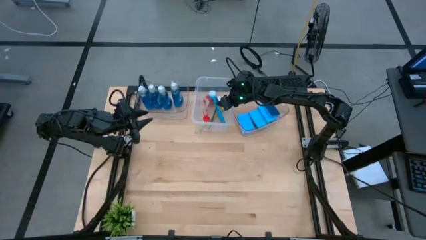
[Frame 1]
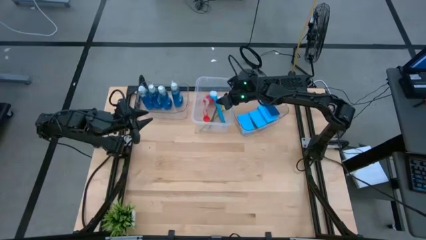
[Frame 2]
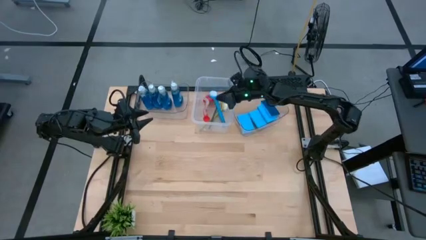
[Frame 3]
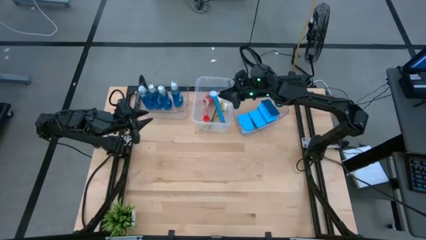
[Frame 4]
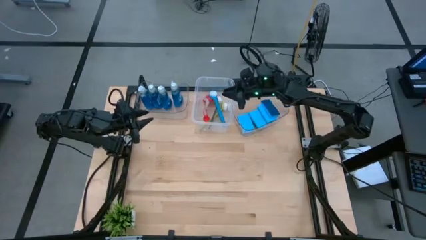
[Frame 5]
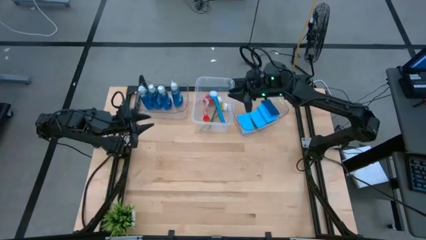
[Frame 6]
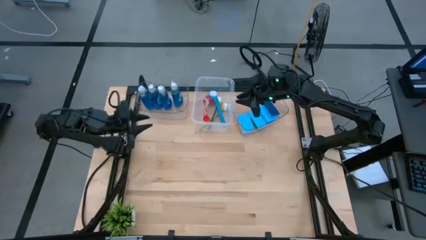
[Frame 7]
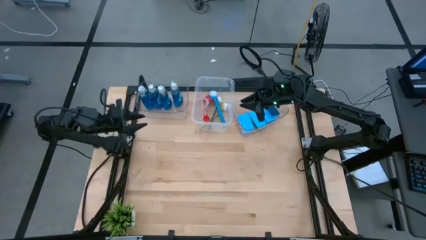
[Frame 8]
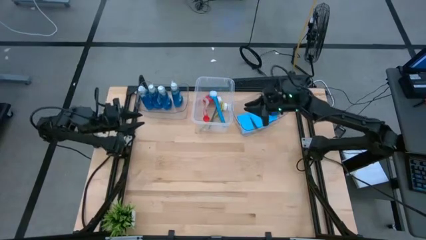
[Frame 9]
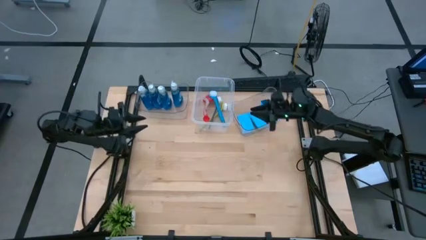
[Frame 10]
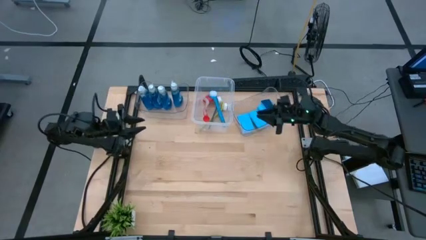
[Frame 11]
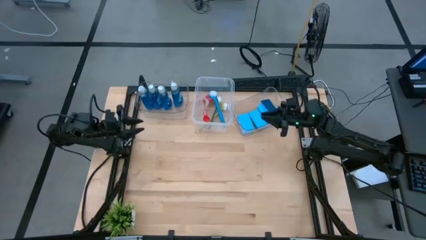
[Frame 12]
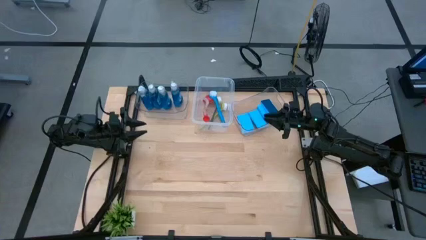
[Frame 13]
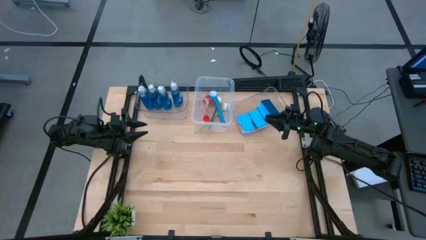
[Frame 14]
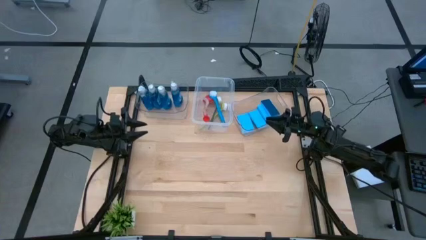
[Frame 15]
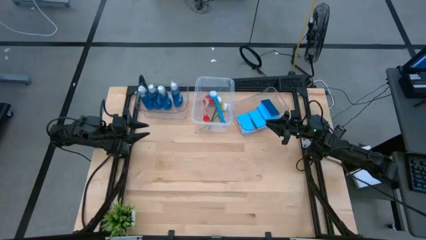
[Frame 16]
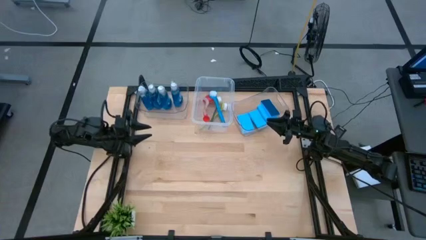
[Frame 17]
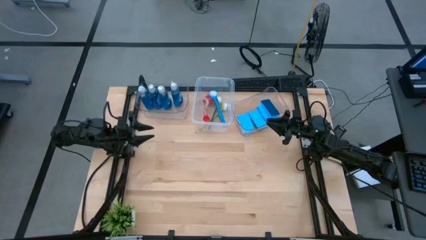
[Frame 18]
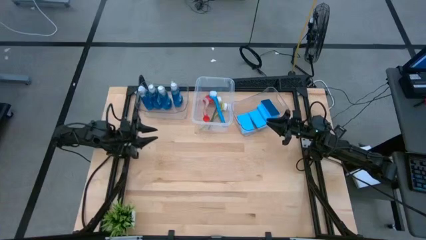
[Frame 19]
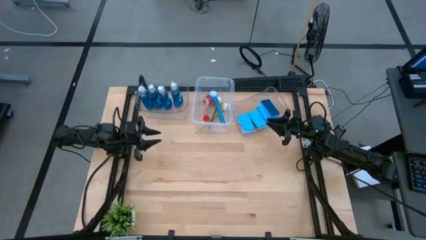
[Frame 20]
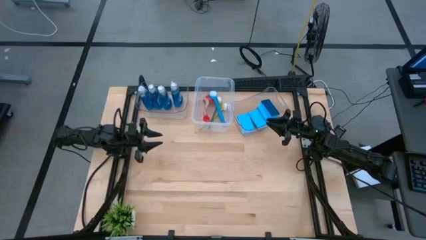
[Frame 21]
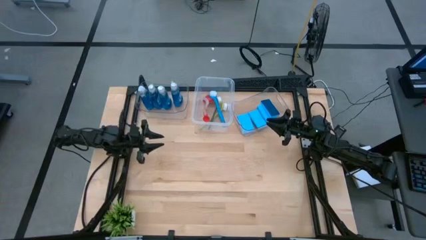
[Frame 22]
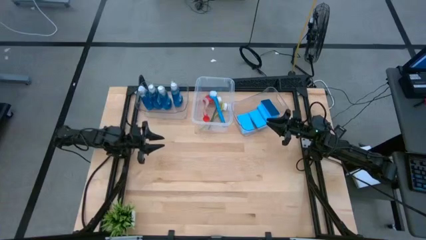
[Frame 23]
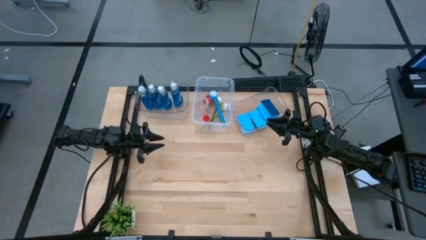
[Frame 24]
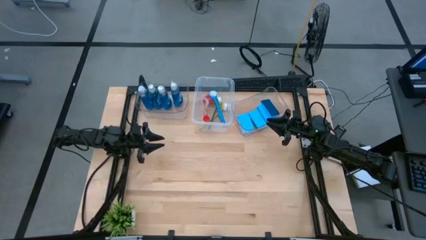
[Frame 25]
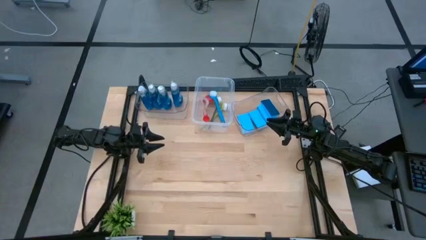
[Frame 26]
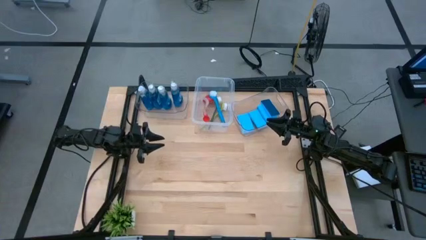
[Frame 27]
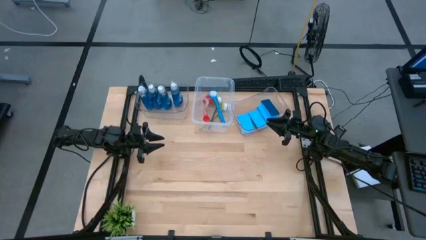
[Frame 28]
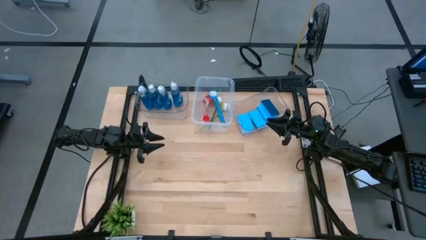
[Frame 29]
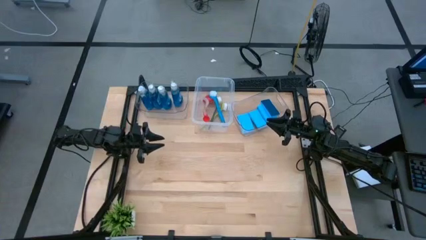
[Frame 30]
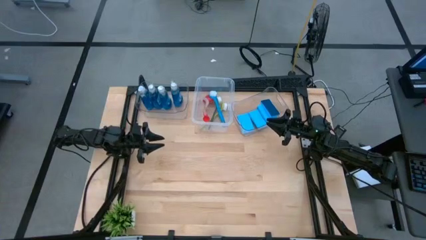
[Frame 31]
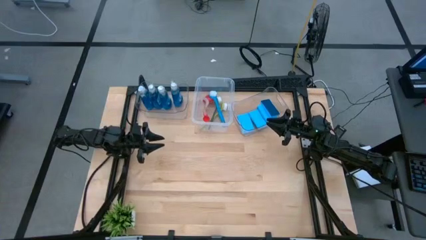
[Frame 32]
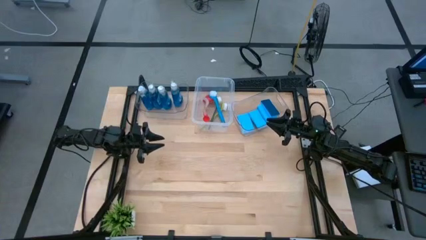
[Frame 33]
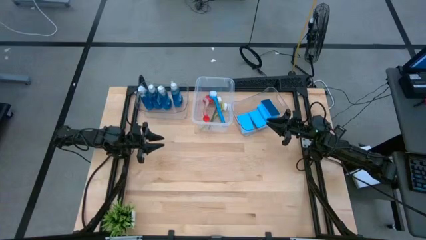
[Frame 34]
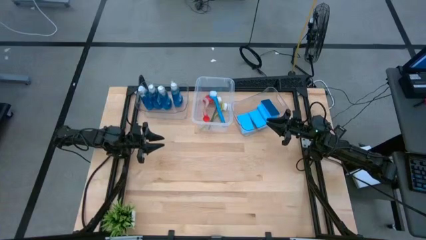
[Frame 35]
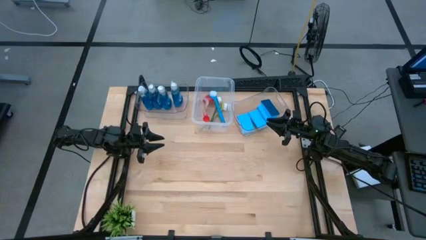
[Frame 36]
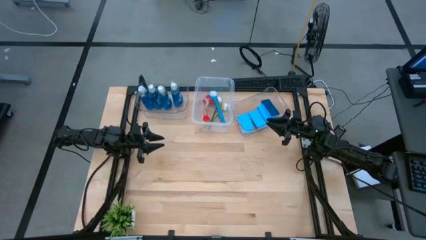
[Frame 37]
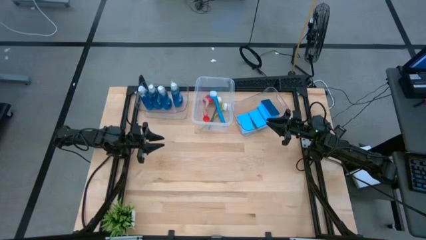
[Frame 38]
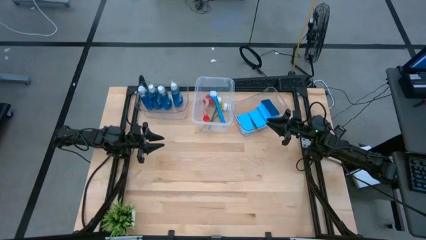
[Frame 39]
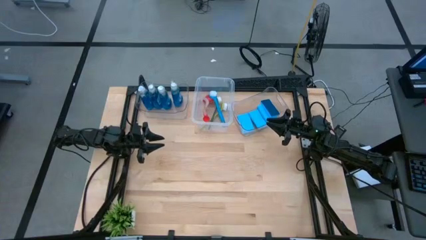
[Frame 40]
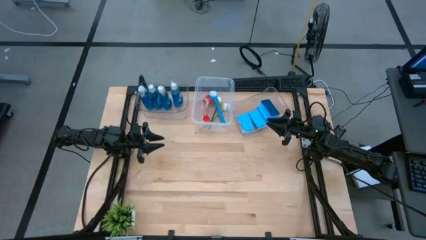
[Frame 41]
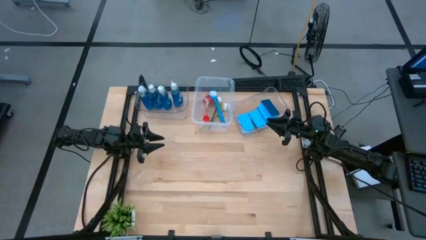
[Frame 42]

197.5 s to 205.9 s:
Task: Pick & Place Kitchen Sink Supplies
Return to Home Position

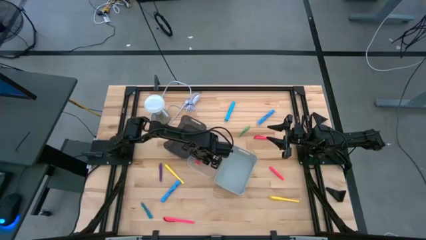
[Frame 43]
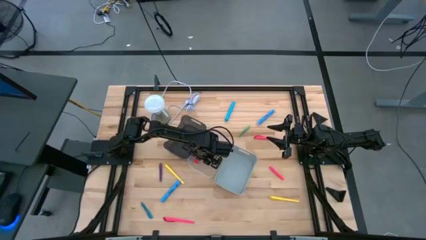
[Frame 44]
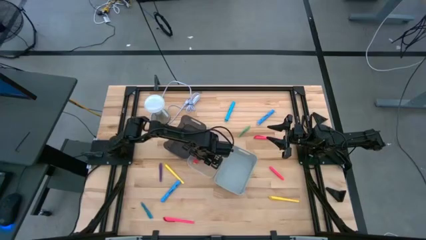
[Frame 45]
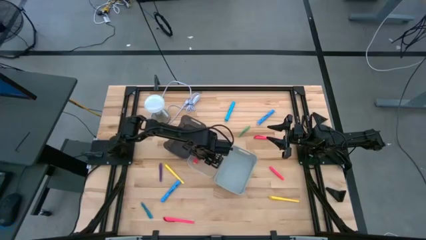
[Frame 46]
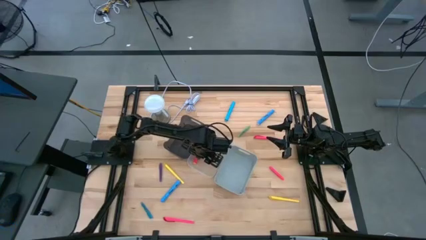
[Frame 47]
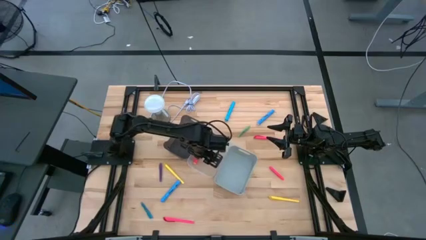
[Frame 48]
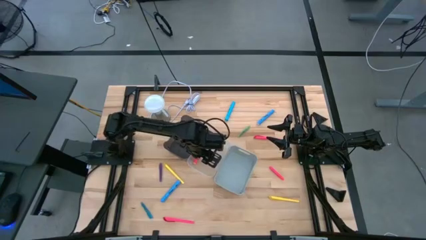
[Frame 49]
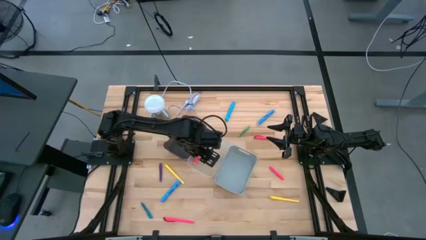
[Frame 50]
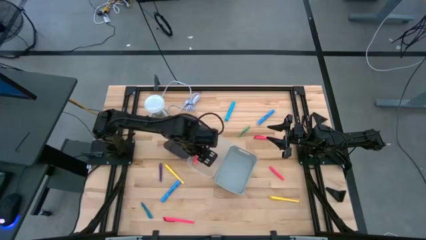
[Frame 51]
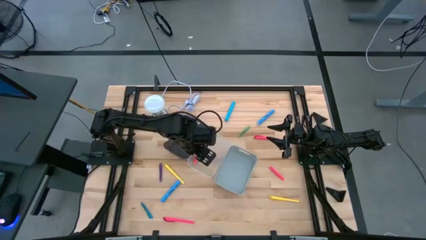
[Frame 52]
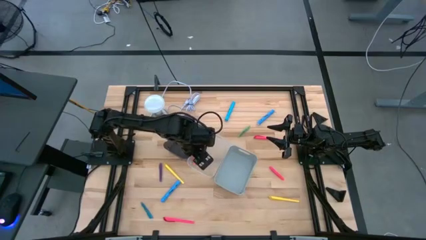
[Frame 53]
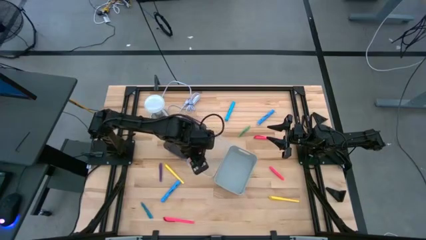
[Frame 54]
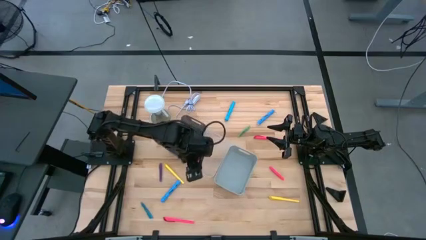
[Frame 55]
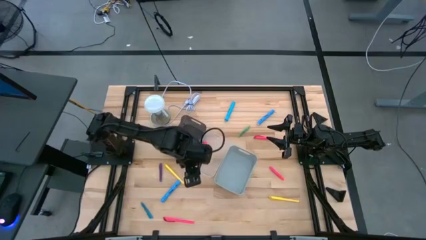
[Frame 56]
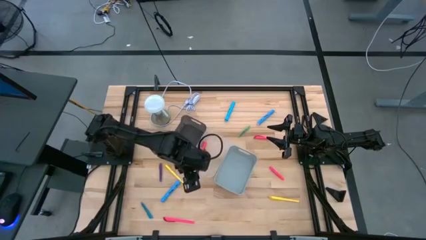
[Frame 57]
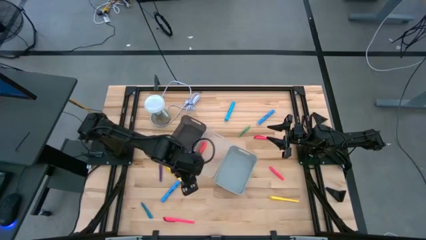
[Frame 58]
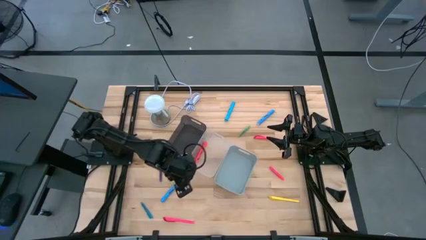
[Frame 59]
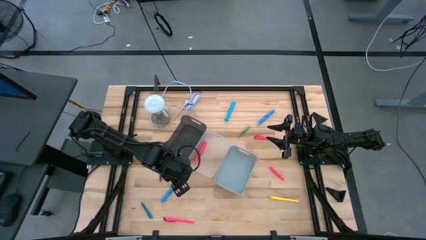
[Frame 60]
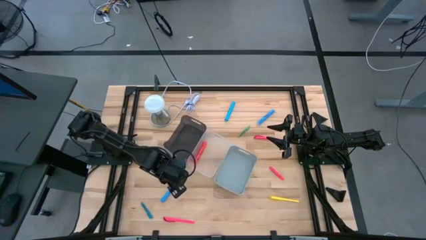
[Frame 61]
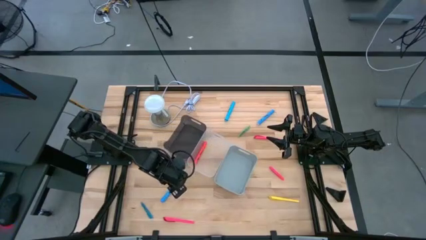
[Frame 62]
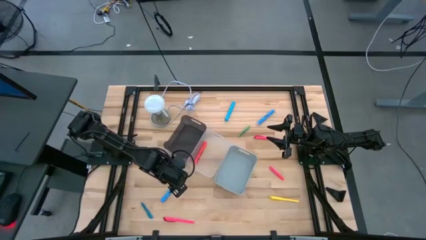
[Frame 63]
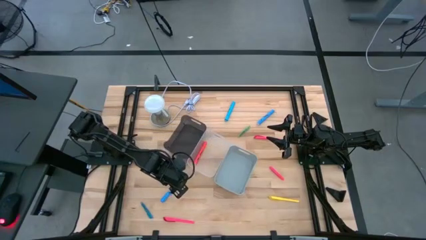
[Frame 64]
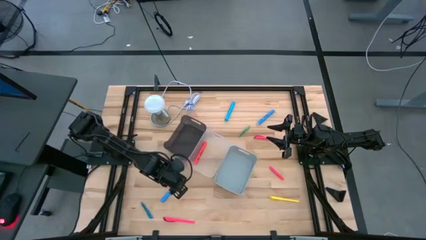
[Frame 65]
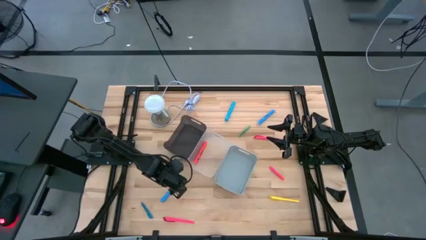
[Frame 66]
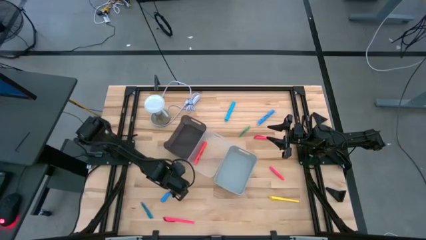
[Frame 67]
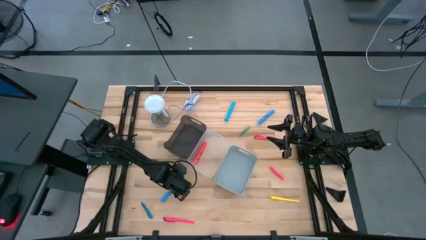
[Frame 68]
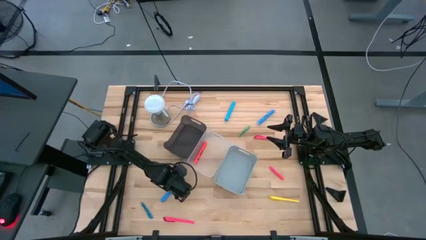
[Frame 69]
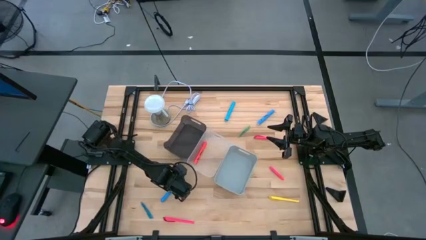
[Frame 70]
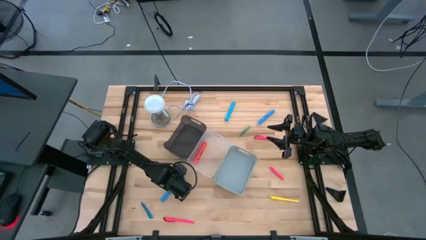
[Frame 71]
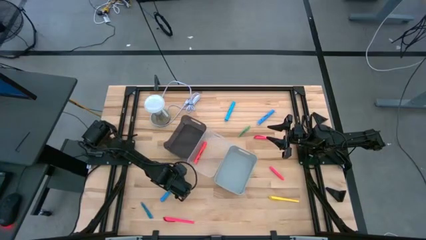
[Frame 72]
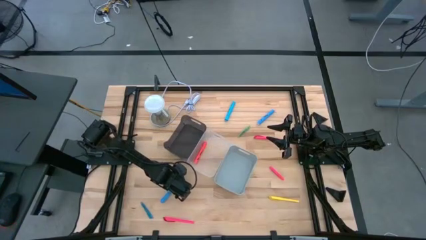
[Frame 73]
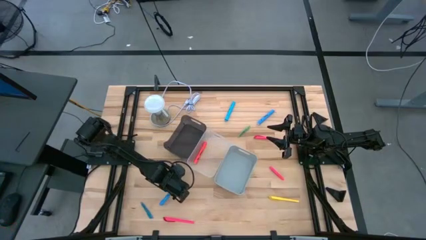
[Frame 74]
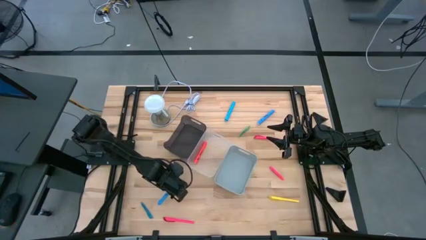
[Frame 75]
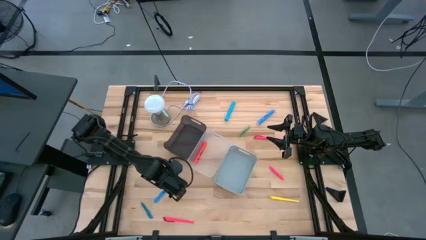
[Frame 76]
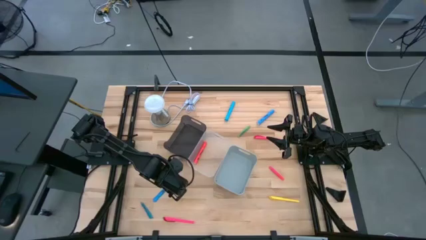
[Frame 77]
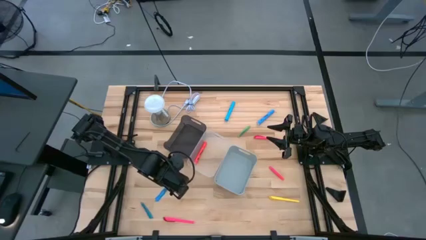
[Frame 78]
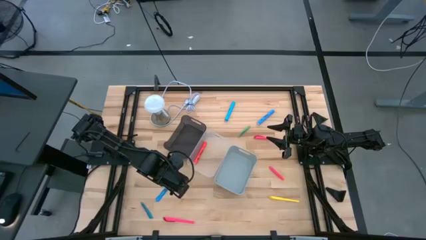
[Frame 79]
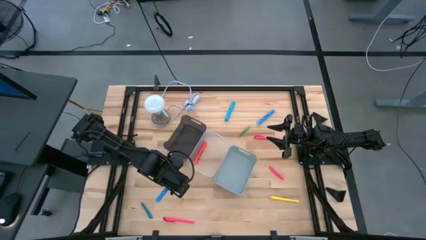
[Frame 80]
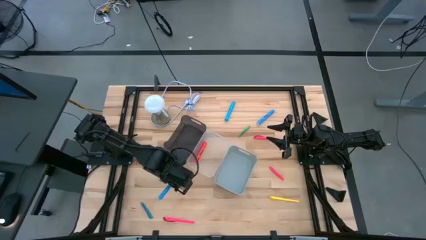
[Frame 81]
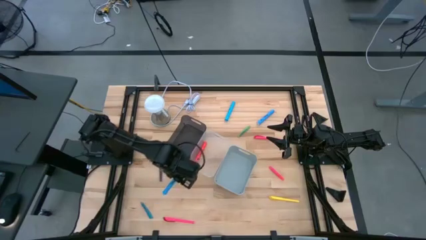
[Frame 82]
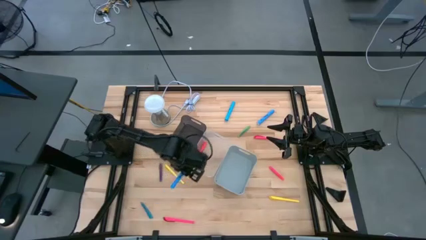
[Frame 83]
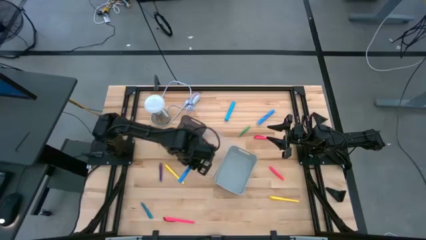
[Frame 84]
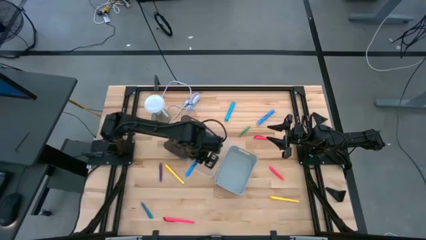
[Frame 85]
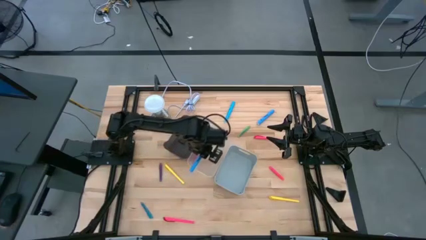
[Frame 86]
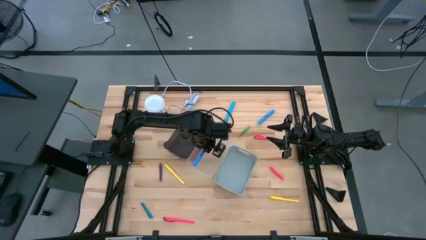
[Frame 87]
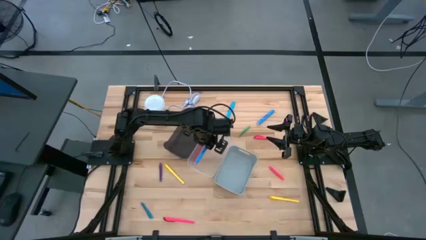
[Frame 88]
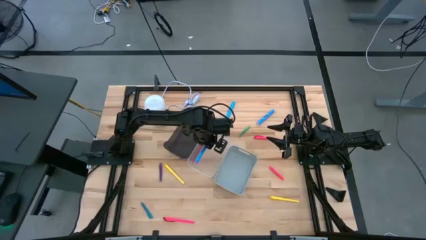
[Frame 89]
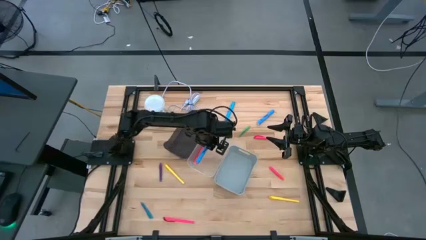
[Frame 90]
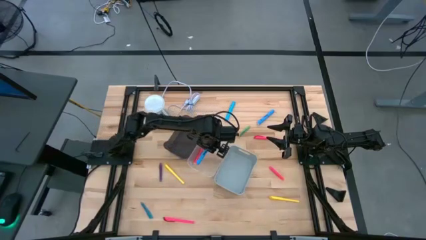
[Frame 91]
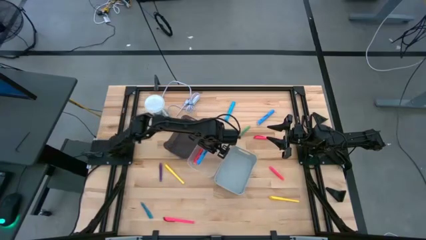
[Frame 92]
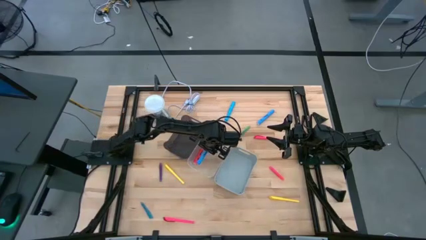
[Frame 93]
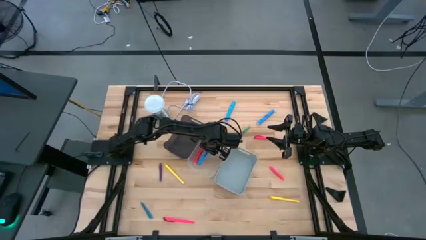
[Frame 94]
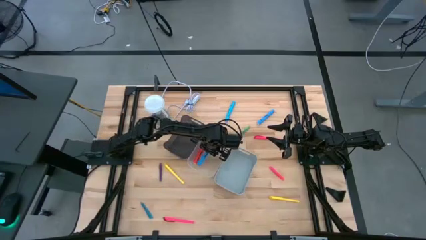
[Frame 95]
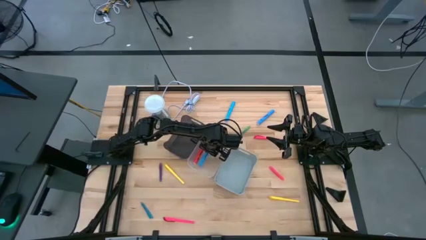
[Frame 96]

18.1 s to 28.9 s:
Task: Pick & Place Markers
Put the bottom blue highlighter into the transparent bin
